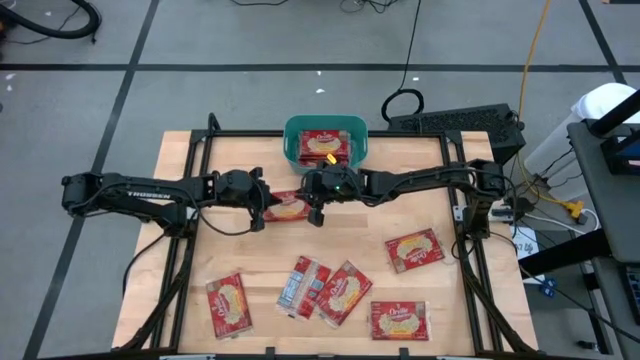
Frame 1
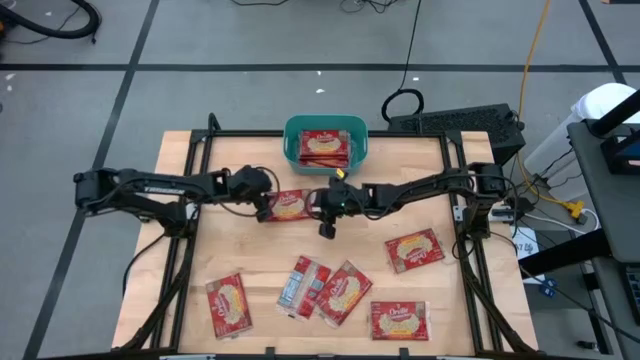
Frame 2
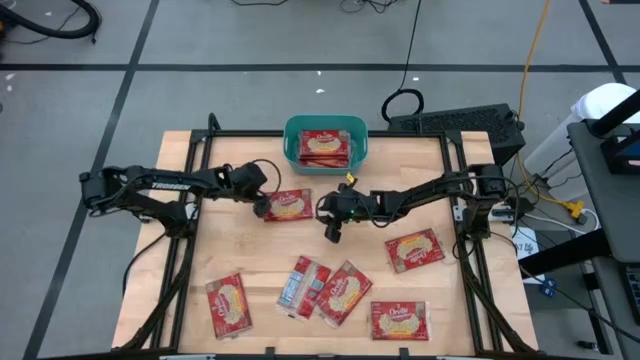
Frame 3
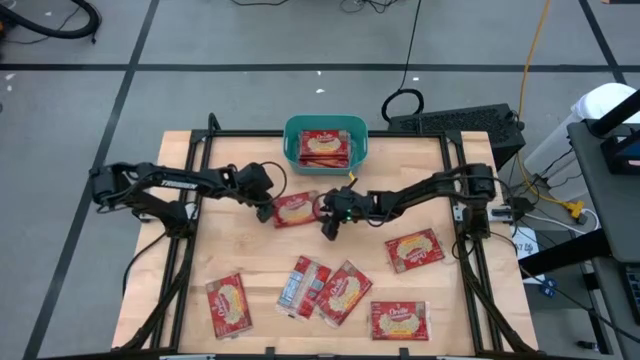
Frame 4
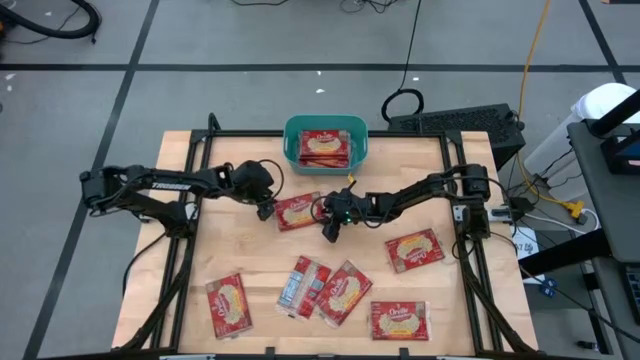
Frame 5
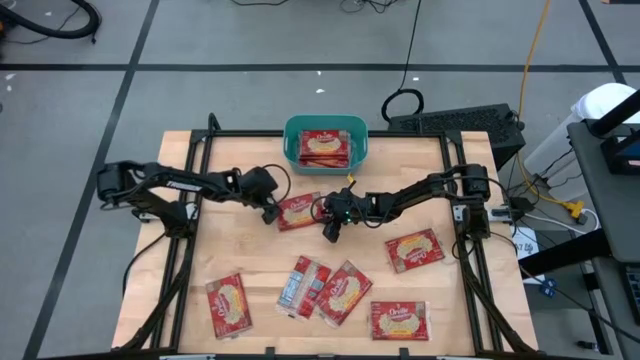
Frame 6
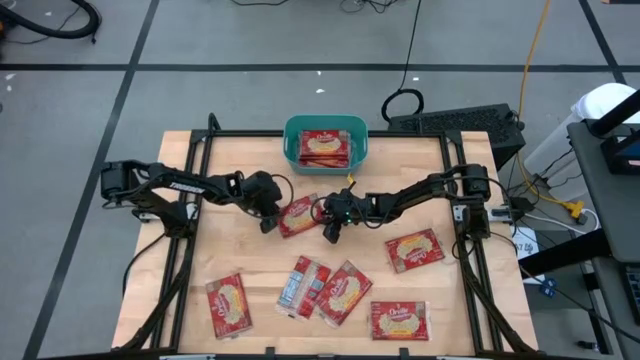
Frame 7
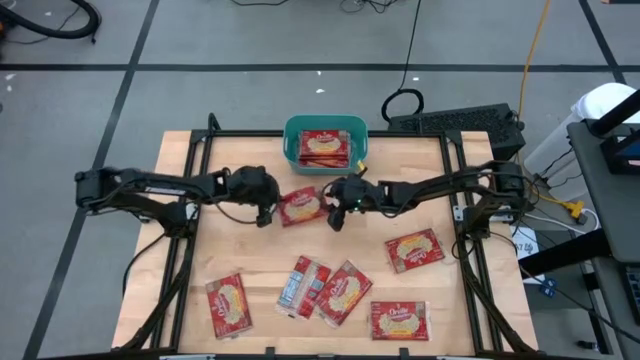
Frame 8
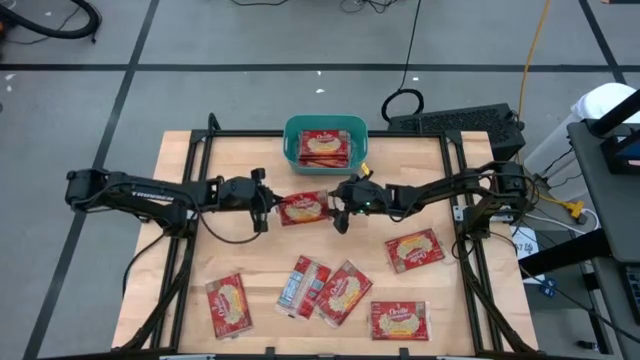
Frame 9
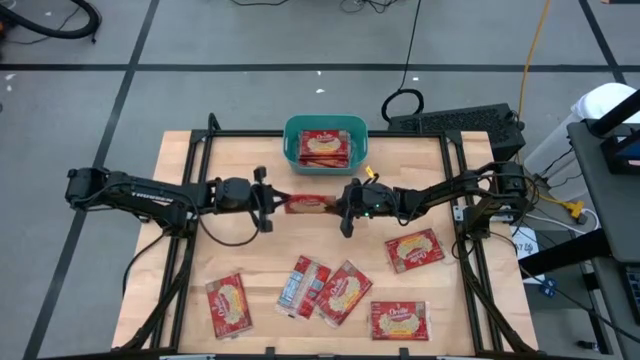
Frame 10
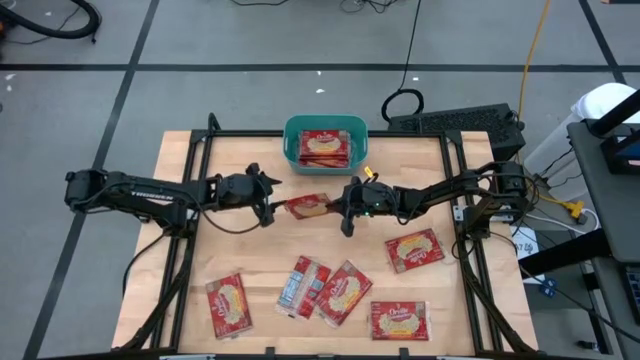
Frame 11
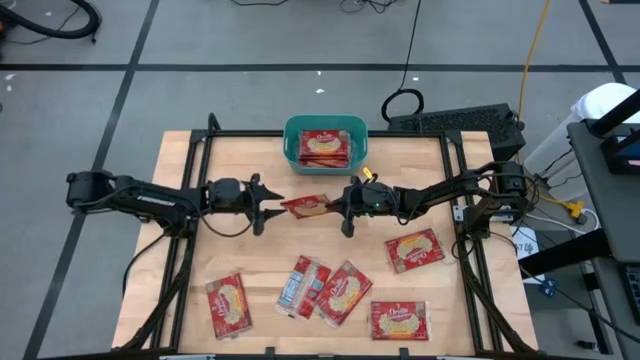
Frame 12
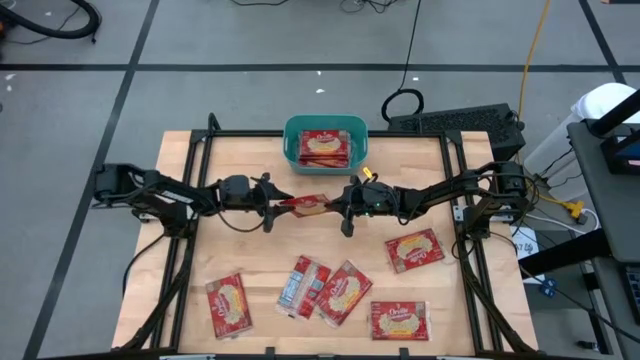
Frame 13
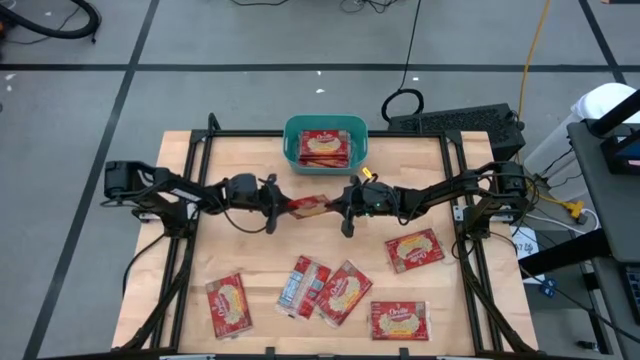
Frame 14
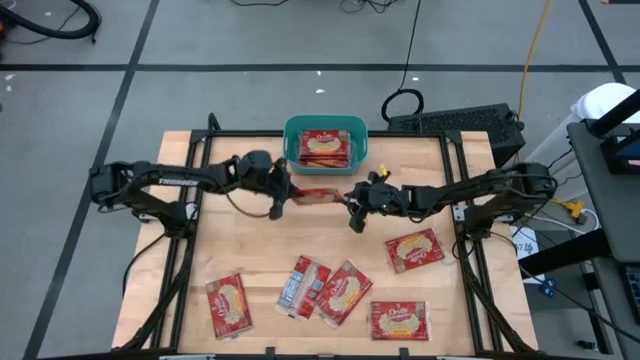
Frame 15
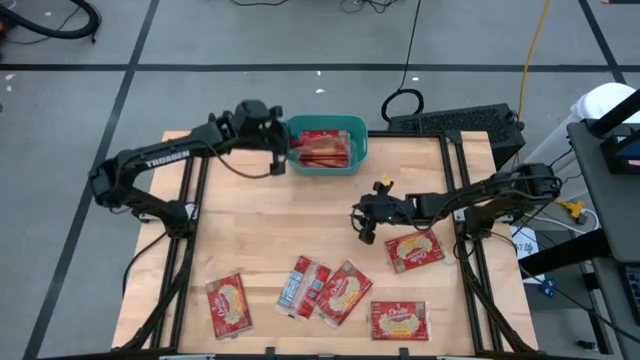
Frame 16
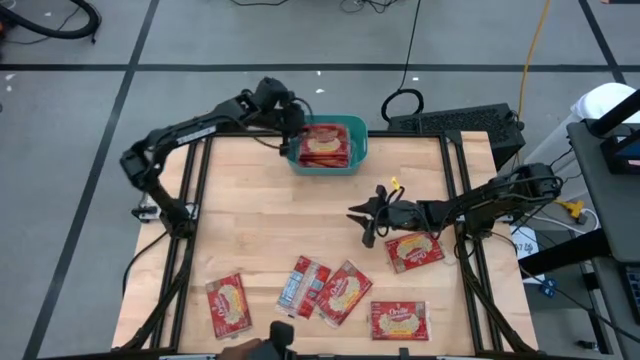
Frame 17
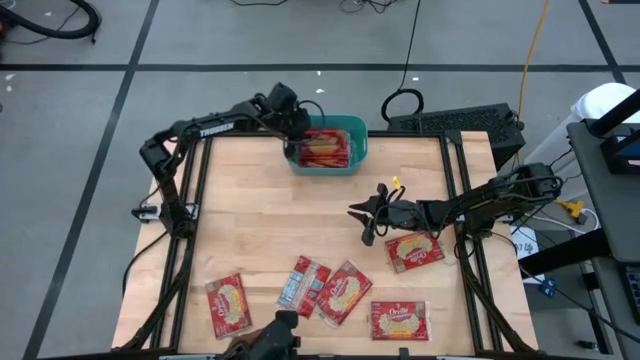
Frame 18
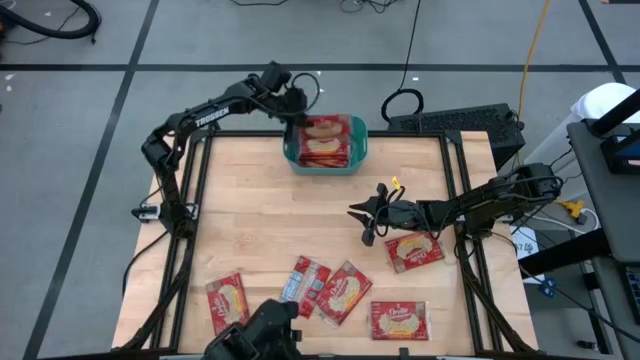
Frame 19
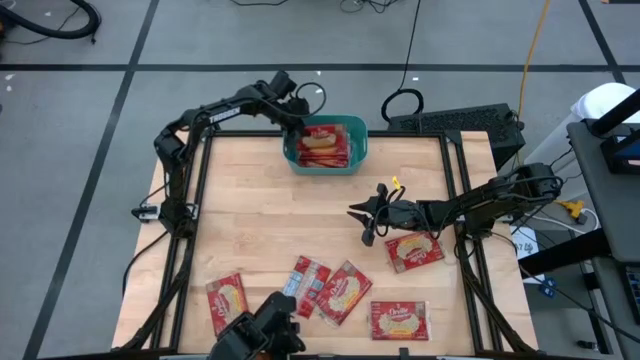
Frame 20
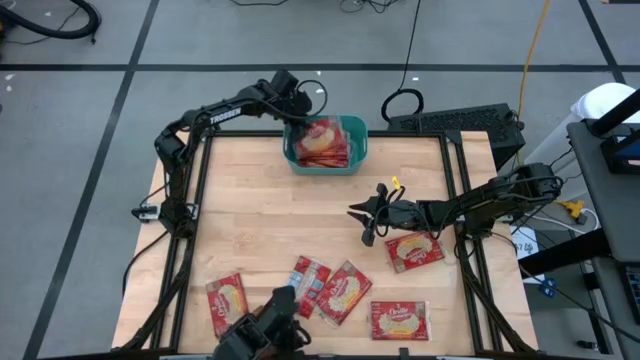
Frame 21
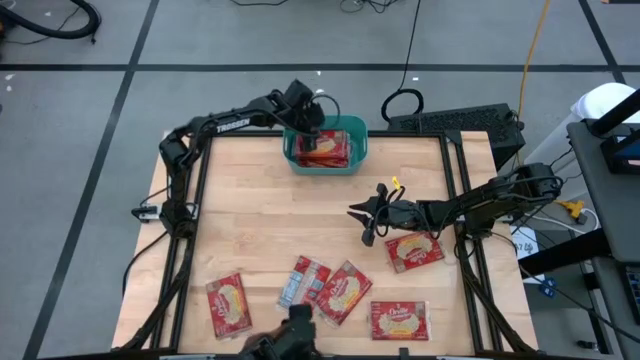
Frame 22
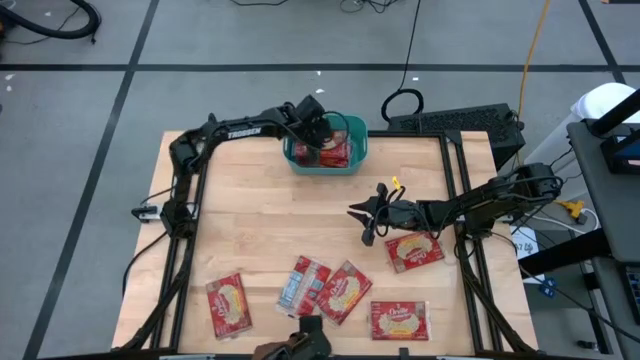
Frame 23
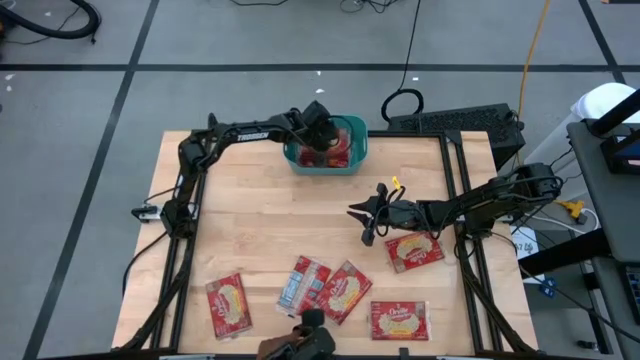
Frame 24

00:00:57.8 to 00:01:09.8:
Task: Sort popcorn bags into baskets
Put the red popcorn bag into the green bin

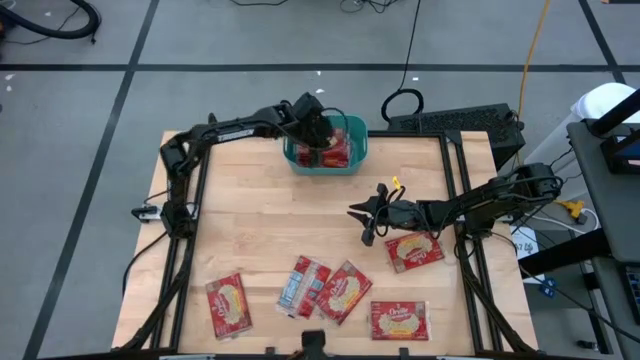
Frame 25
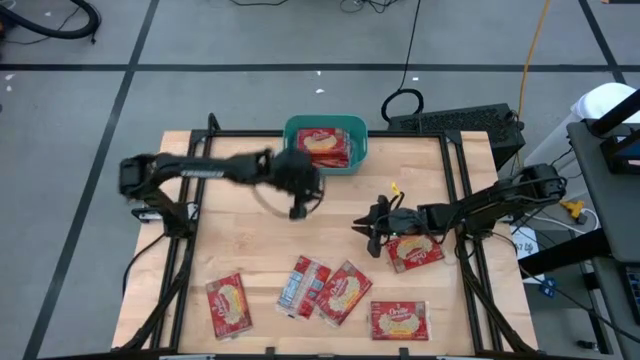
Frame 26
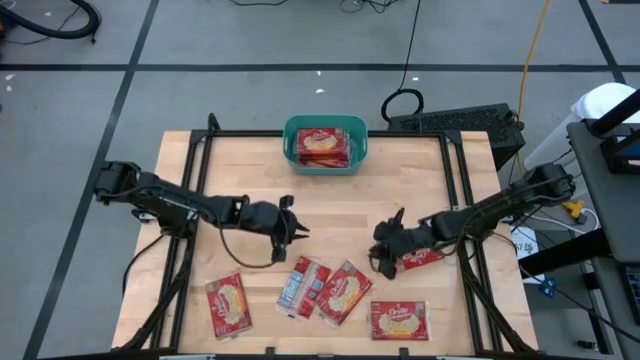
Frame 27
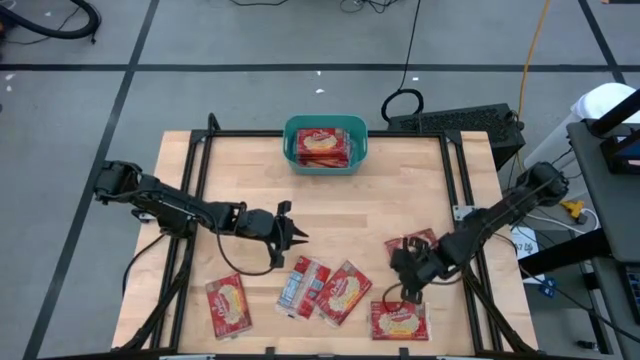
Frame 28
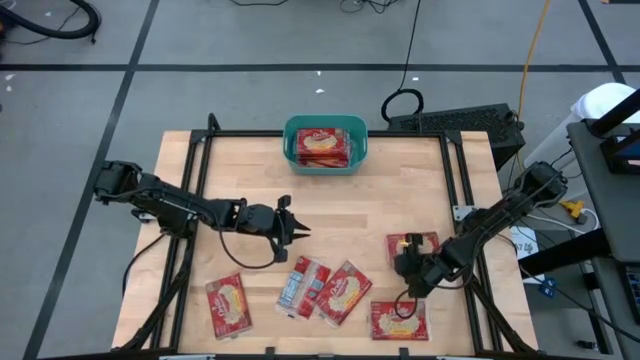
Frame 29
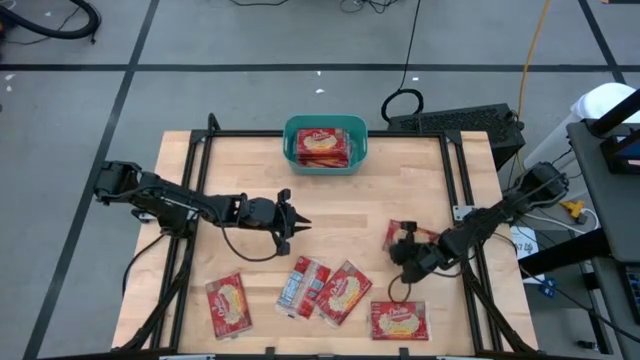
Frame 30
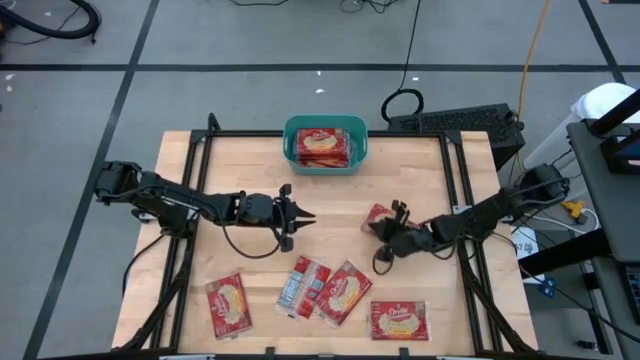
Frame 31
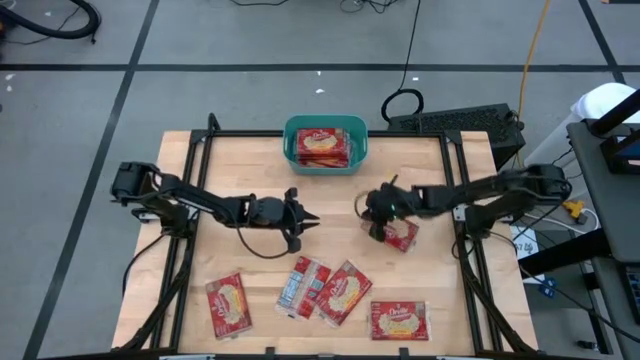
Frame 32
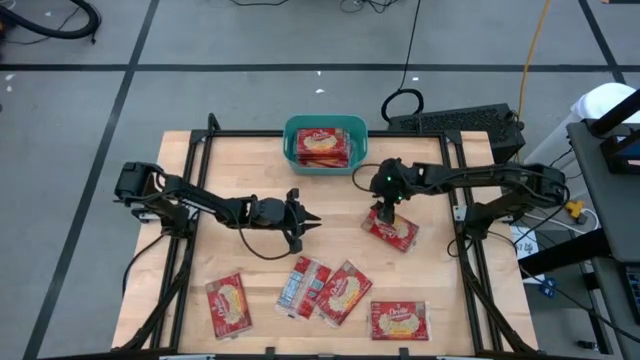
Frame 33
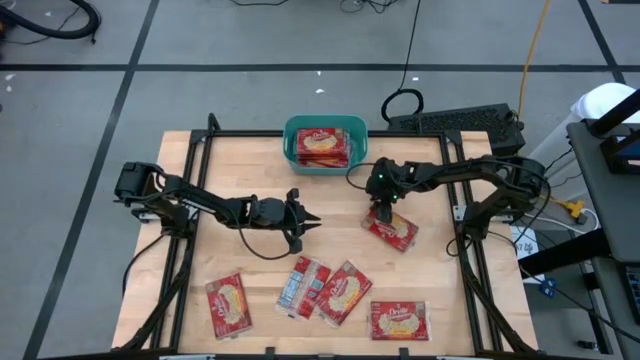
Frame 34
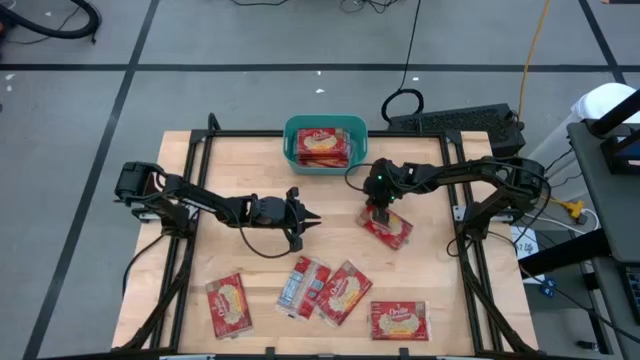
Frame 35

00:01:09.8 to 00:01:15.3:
Put the red popcorn bag into the green bin

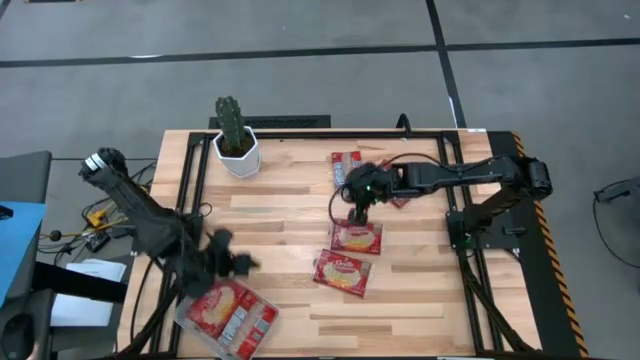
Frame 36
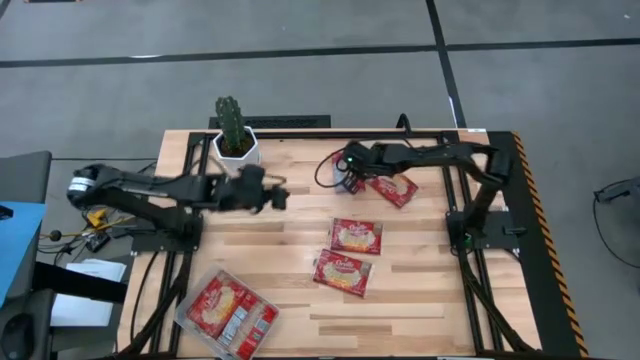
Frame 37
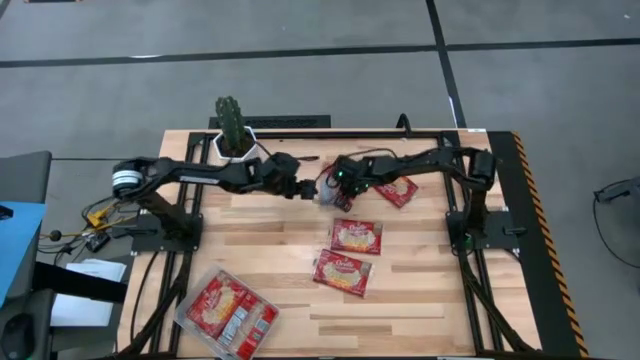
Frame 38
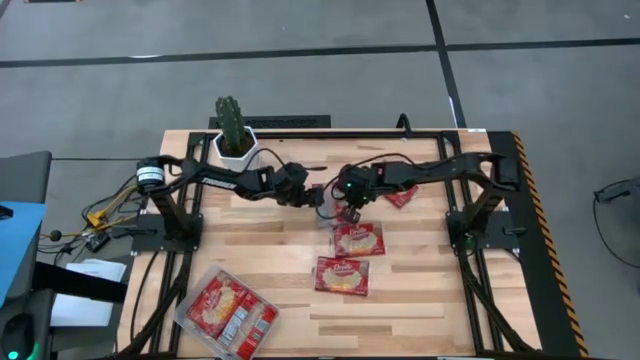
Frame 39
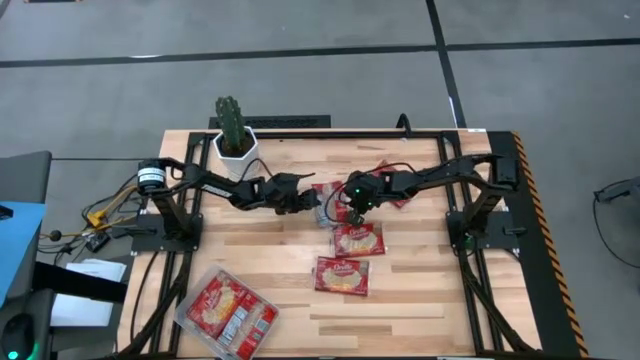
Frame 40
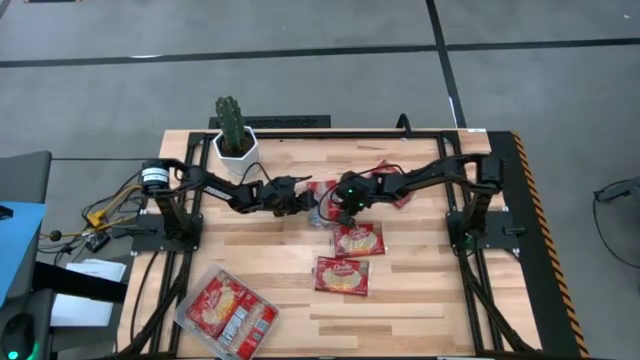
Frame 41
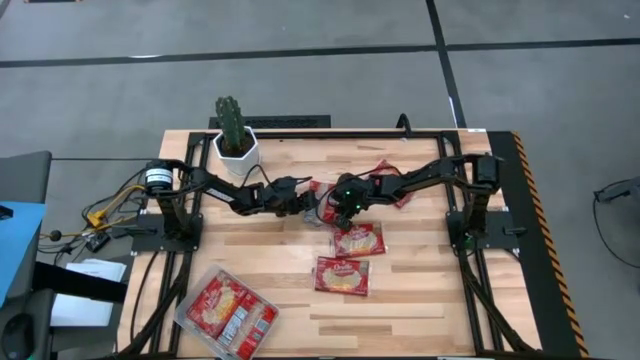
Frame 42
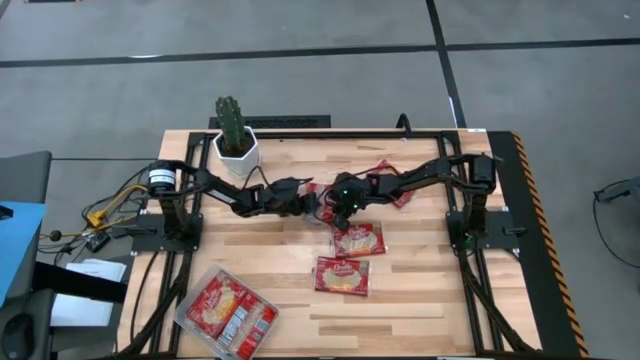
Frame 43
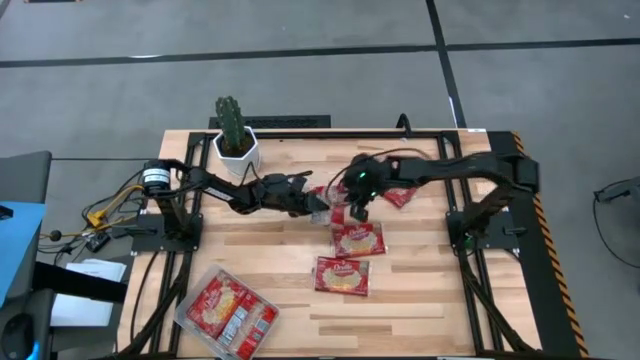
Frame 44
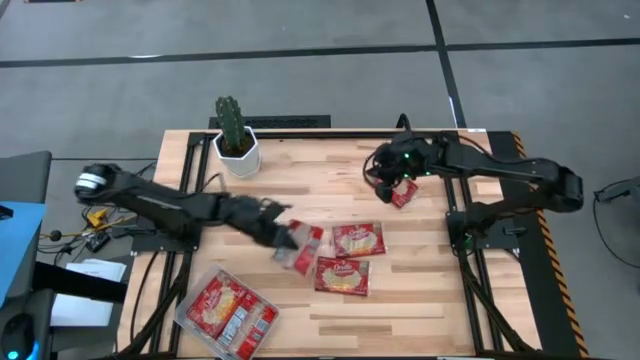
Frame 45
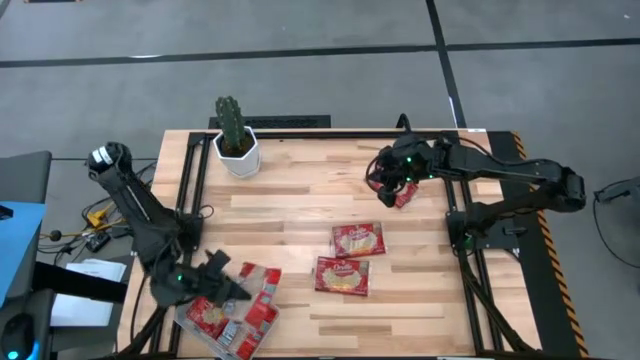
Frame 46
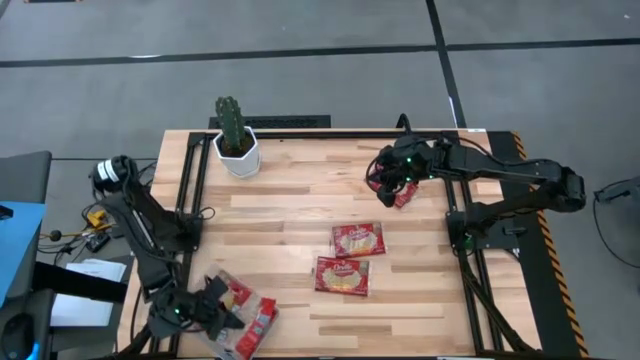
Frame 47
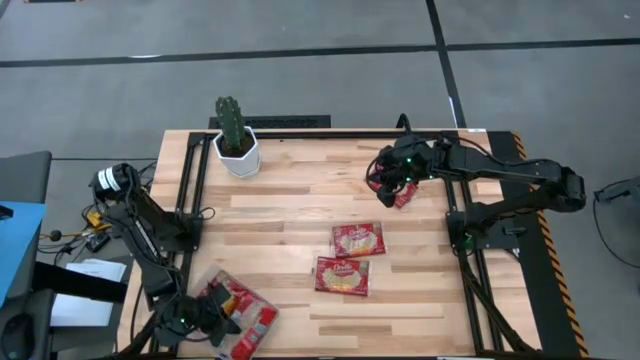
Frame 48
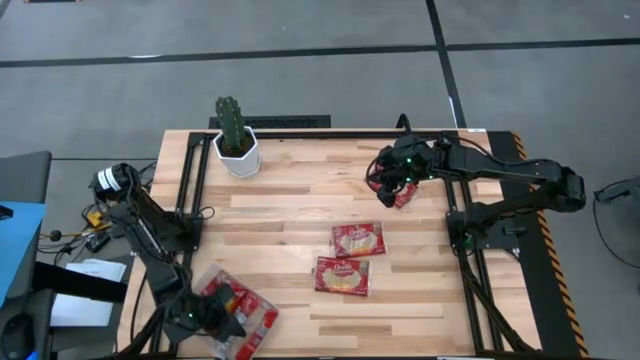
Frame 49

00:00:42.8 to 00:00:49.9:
Task: Sort popcorn bags into baskets
Put the red popcorn bag into the transparent bin
